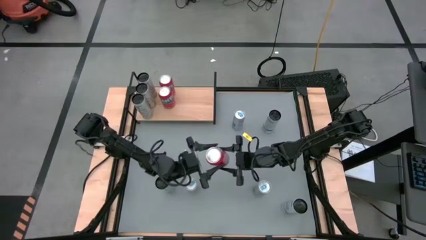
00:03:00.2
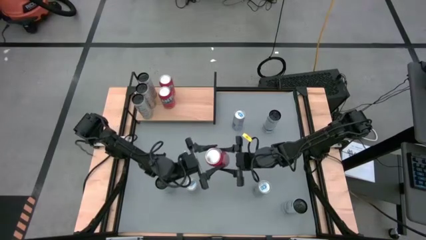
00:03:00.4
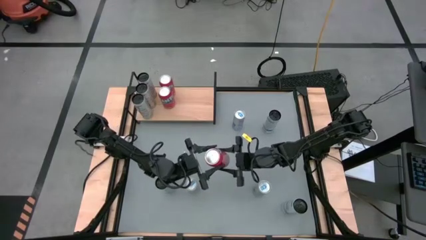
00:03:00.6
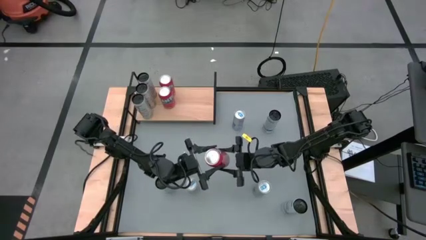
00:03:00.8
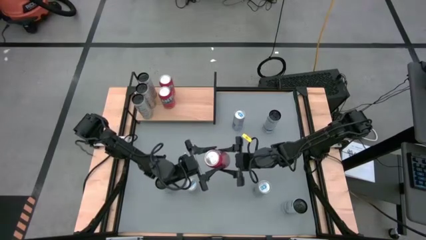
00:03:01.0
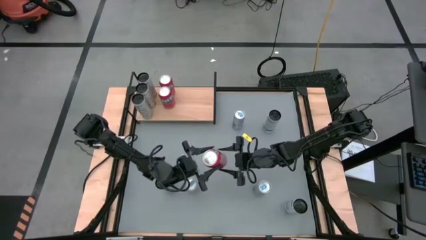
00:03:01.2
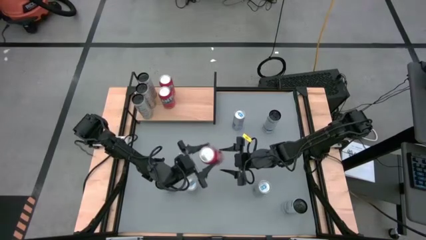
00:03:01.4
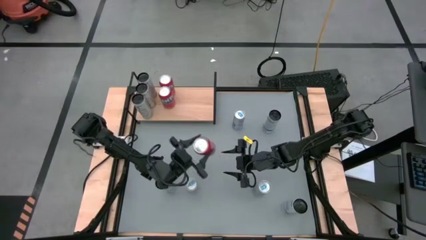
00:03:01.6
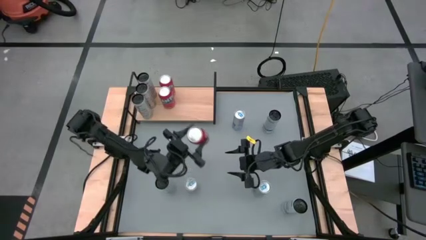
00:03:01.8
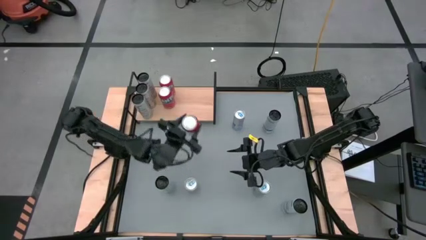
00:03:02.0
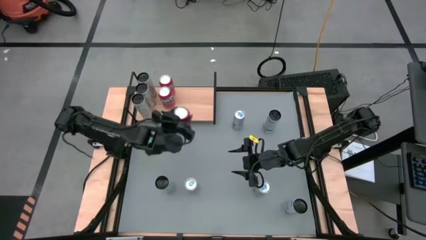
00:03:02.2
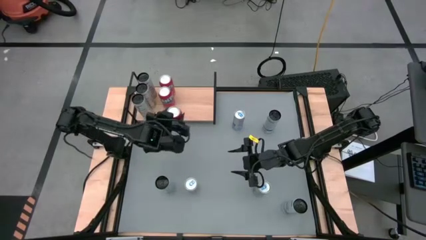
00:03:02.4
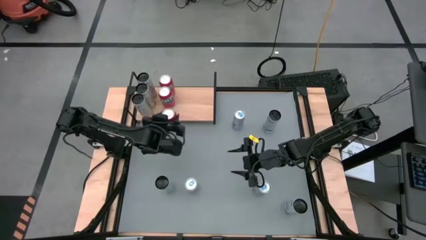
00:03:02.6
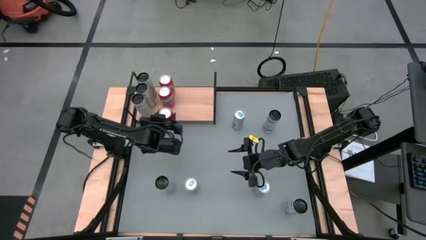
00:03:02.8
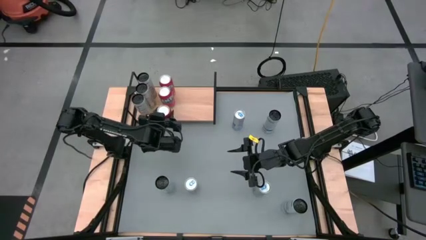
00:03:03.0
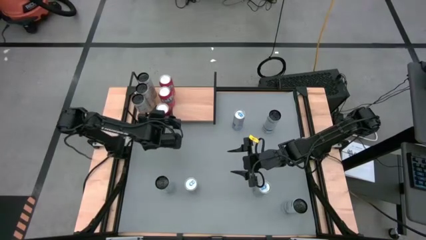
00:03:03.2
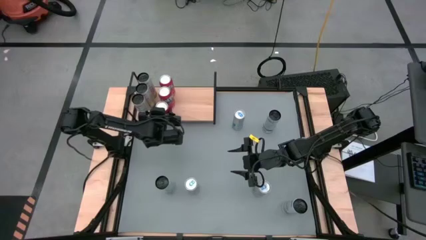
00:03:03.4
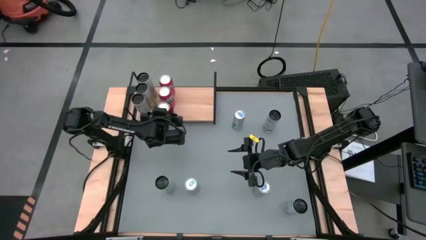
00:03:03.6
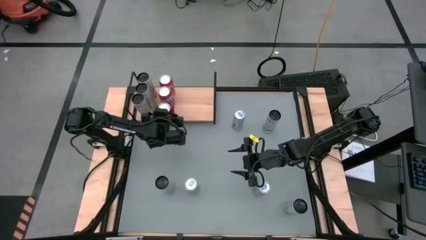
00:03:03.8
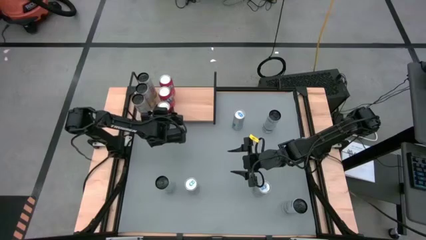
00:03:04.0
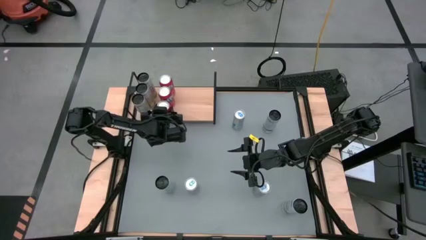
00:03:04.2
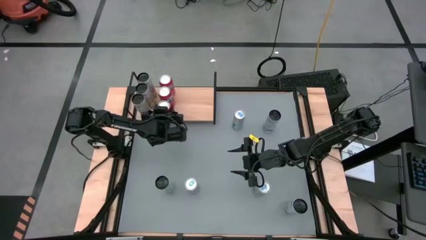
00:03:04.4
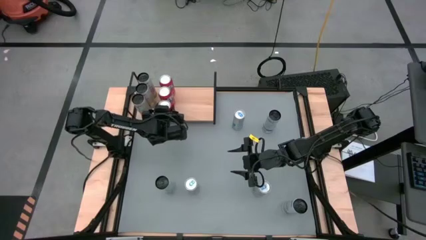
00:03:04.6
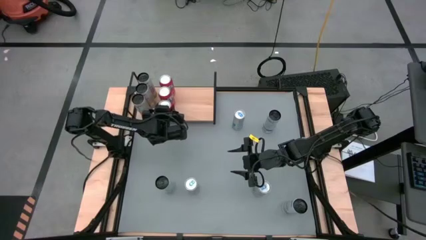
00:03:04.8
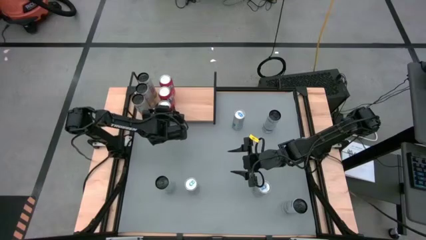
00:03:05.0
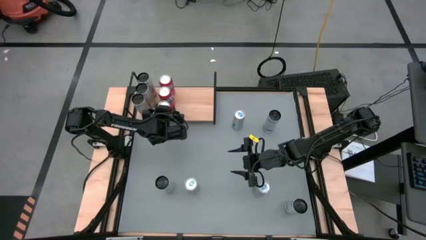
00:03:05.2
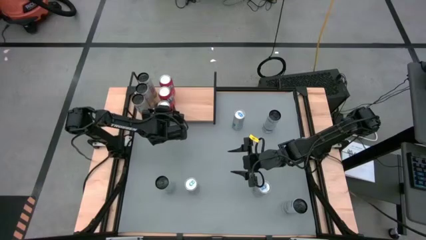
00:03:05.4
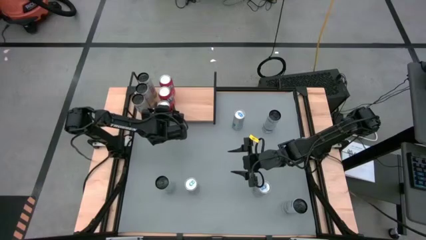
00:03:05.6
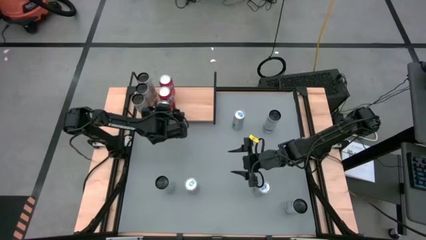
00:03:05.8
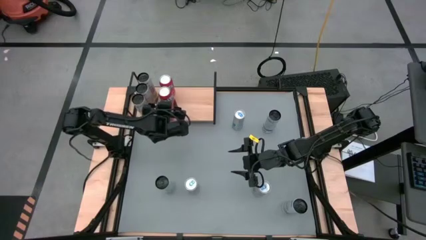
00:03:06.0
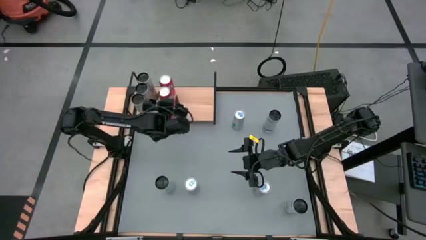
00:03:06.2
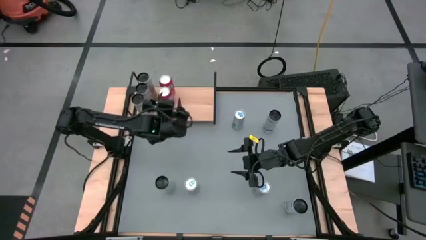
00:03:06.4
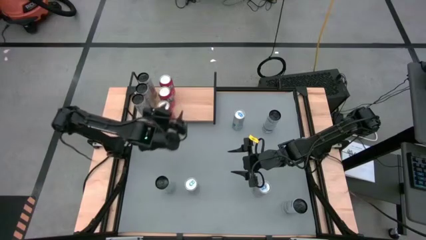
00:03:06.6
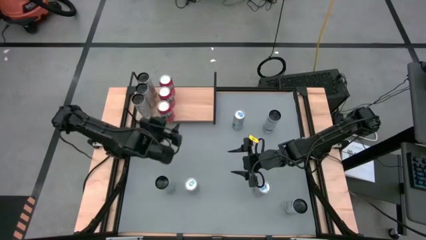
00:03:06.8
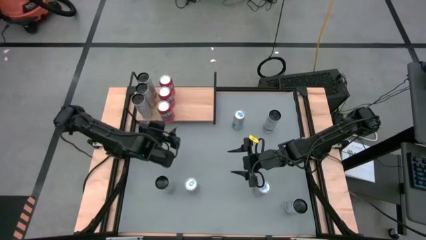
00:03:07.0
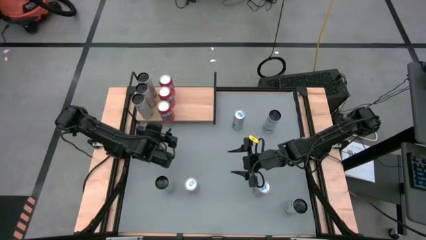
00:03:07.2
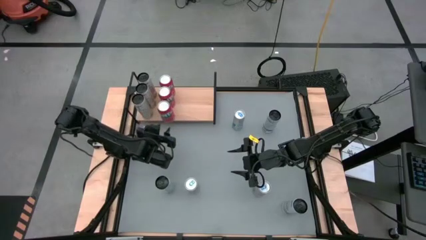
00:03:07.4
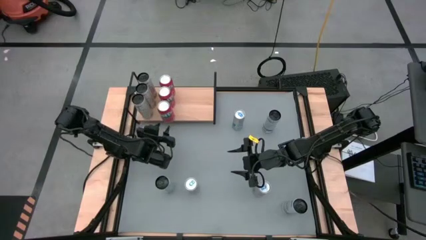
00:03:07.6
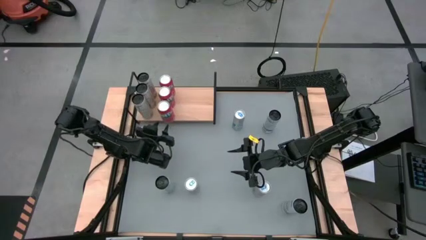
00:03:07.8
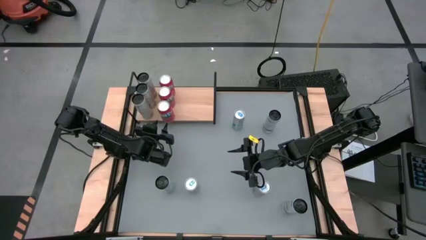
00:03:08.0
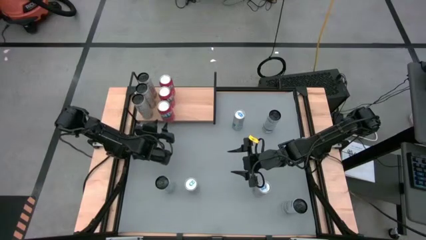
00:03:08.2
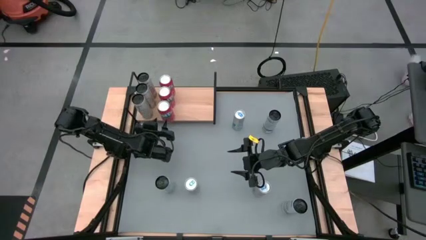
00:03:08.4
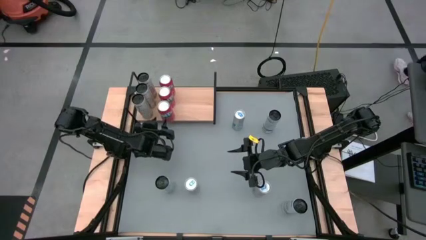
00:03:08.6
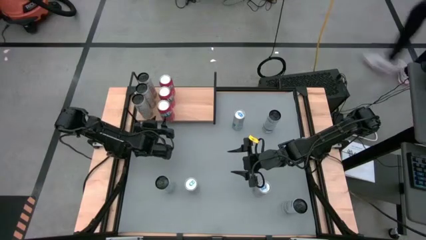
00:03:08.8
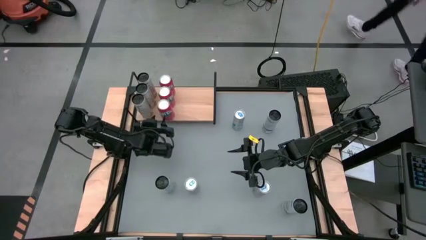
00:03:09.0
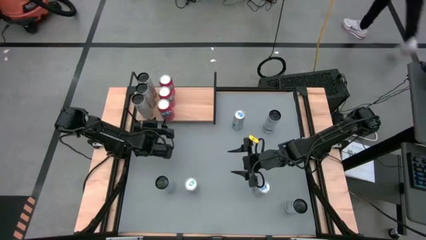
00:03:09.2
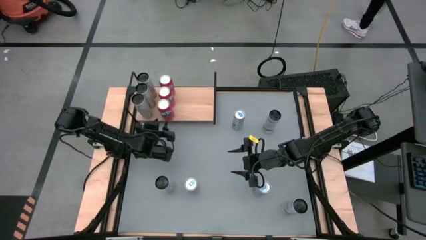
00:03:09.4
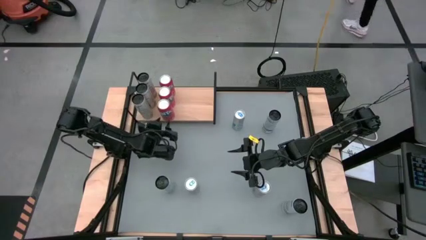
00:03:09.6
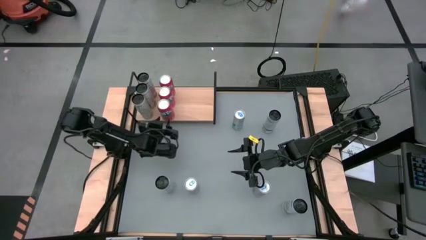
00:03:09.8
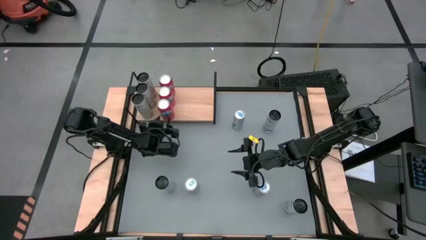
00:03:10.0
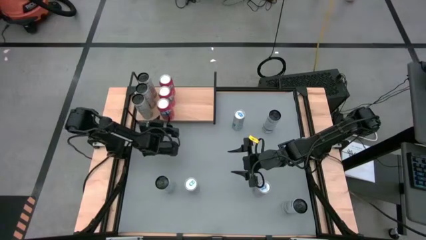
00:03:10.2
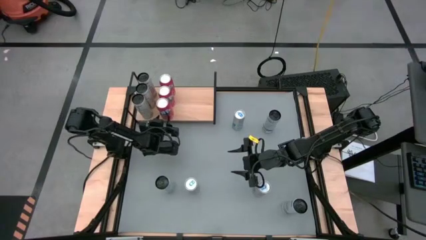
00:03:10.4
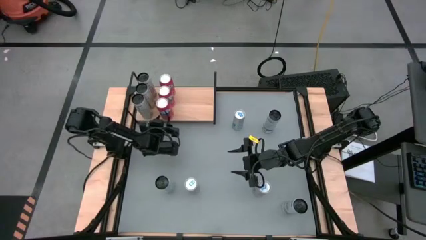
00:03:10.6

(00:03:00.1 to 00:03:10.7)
Task: Place canned beverage on shelf
Put the red soda can on the shelf aligned with the other red soda can
